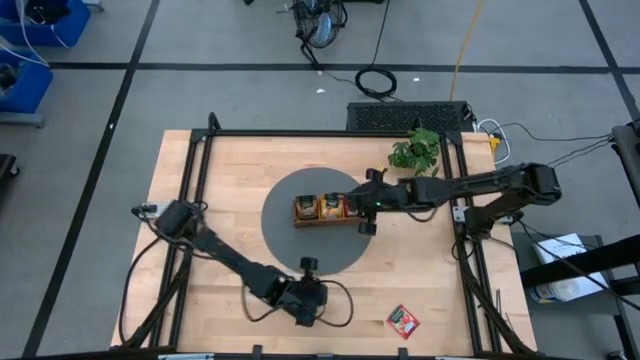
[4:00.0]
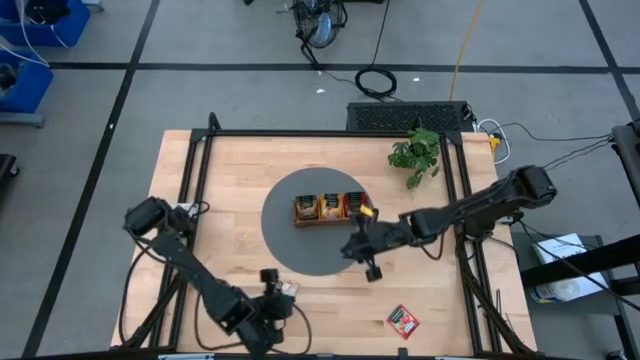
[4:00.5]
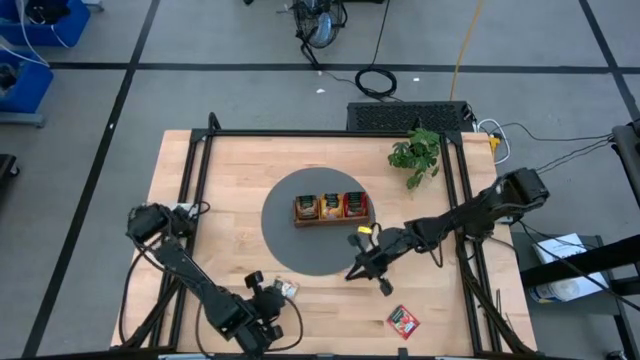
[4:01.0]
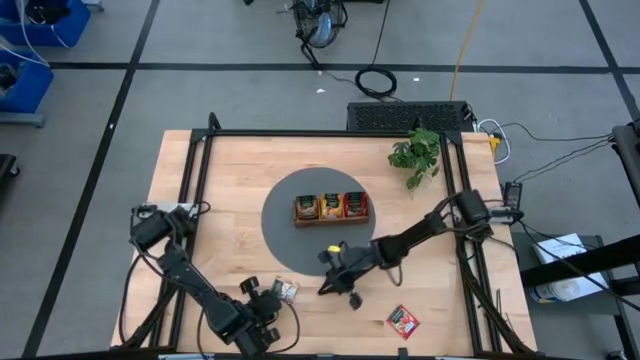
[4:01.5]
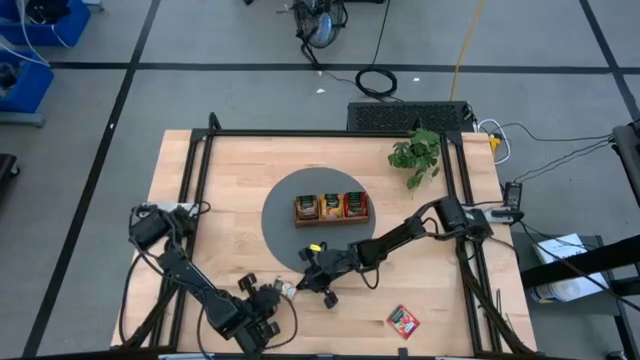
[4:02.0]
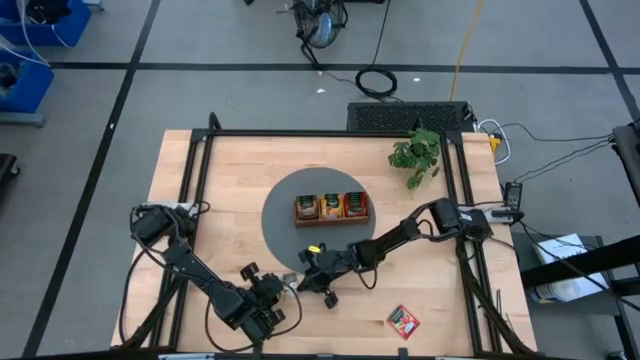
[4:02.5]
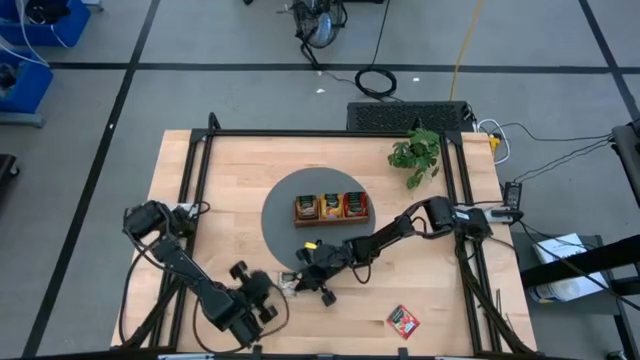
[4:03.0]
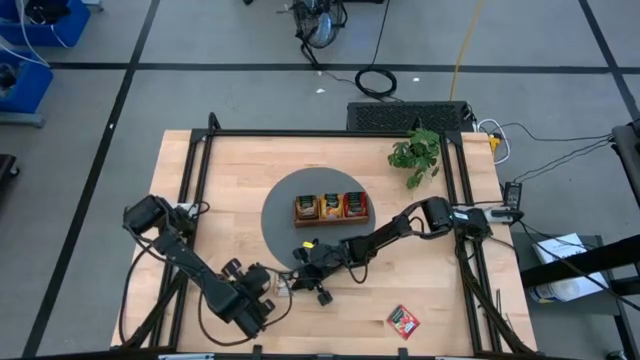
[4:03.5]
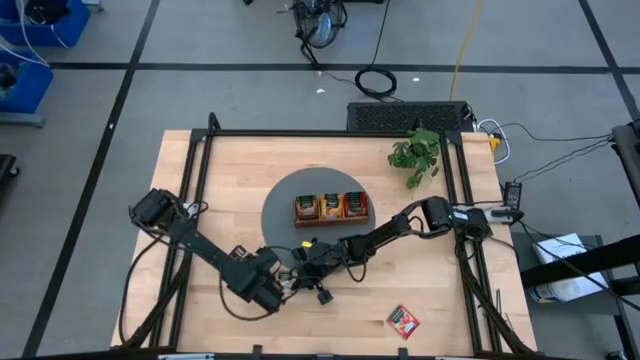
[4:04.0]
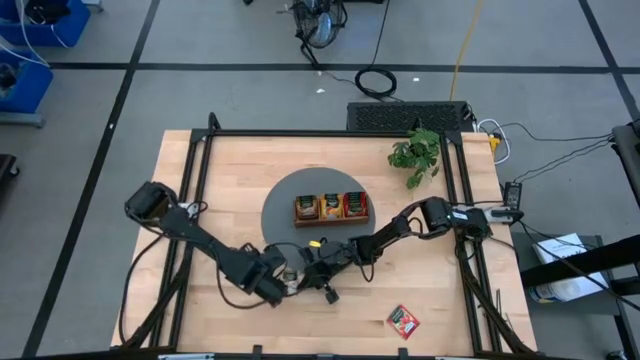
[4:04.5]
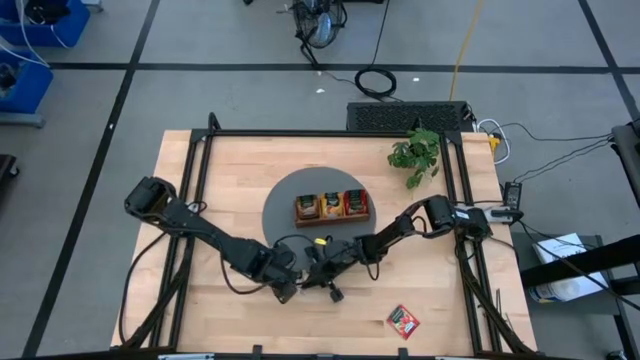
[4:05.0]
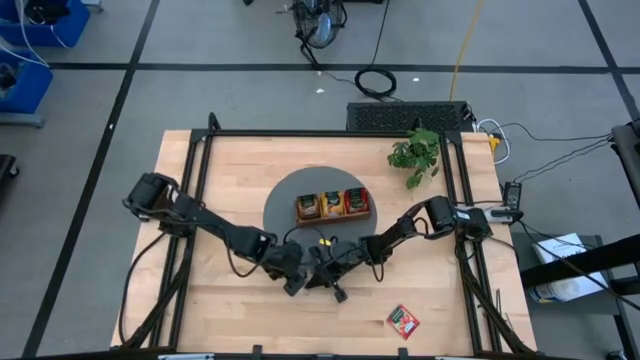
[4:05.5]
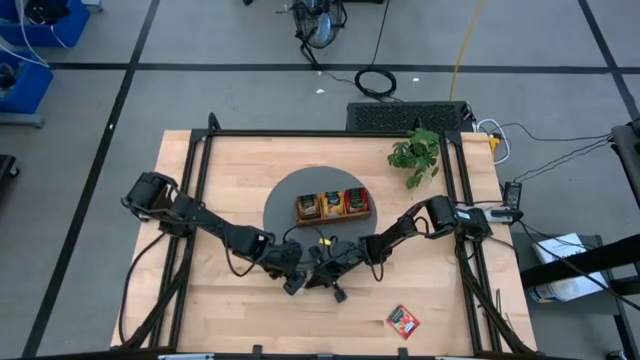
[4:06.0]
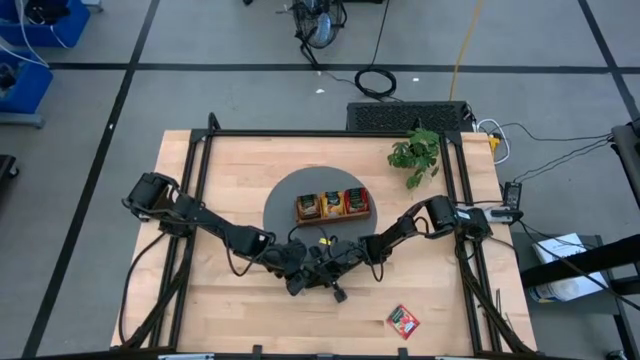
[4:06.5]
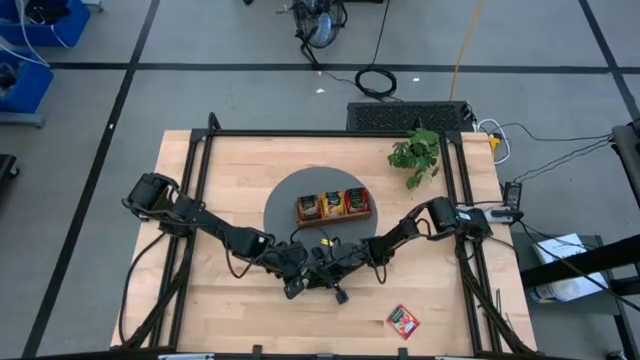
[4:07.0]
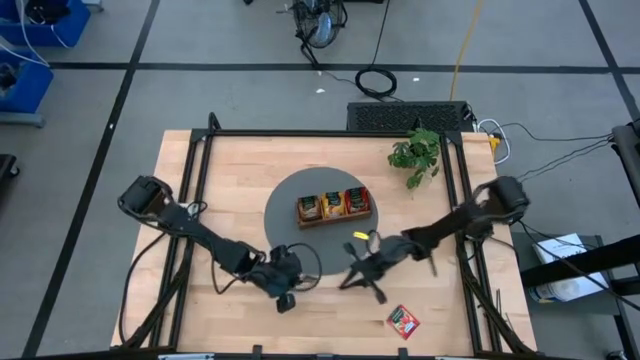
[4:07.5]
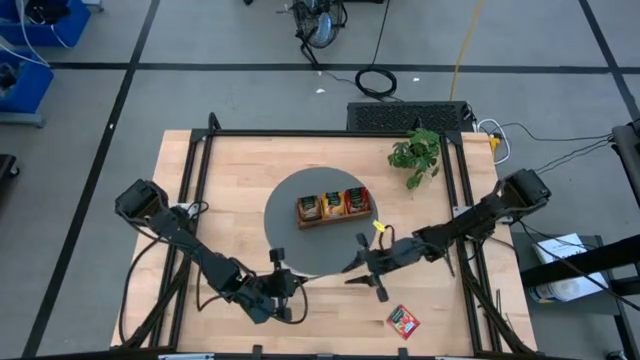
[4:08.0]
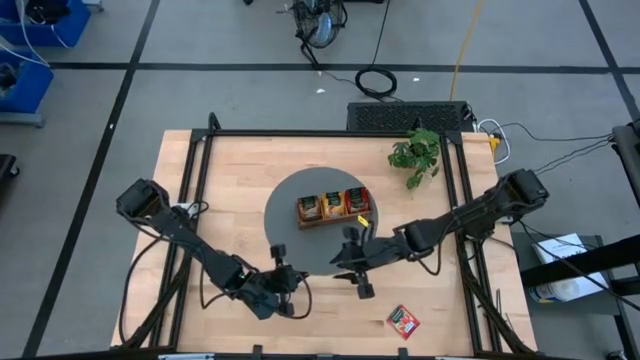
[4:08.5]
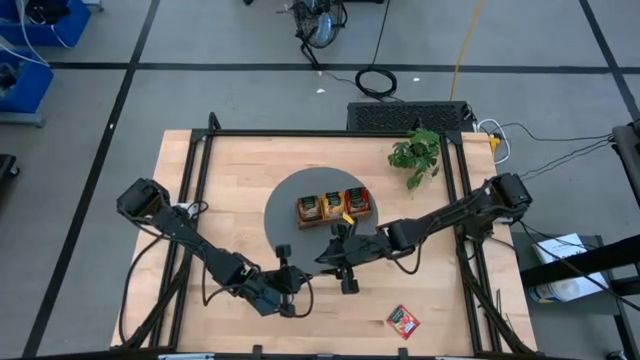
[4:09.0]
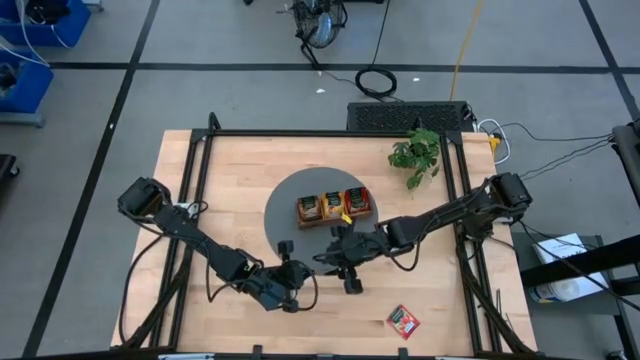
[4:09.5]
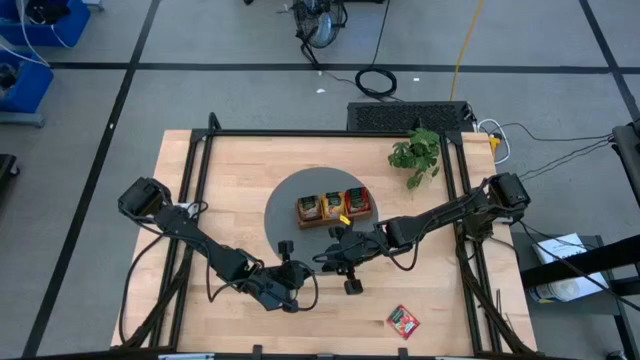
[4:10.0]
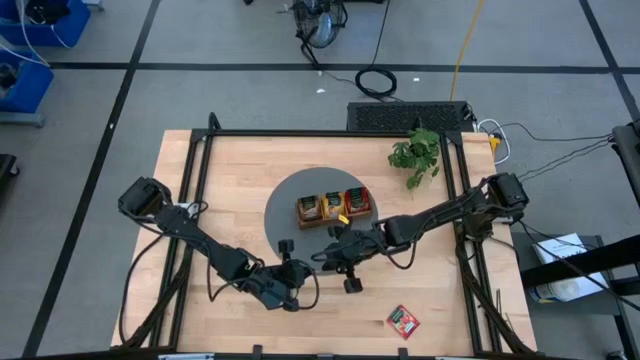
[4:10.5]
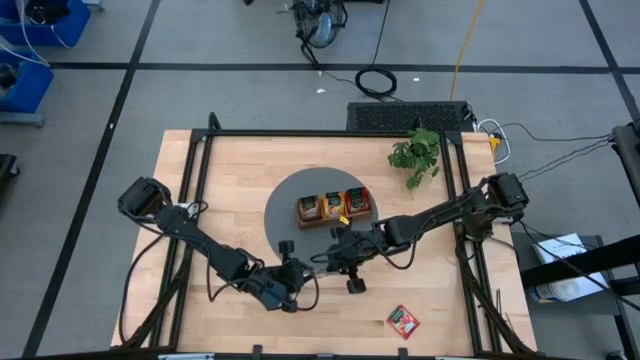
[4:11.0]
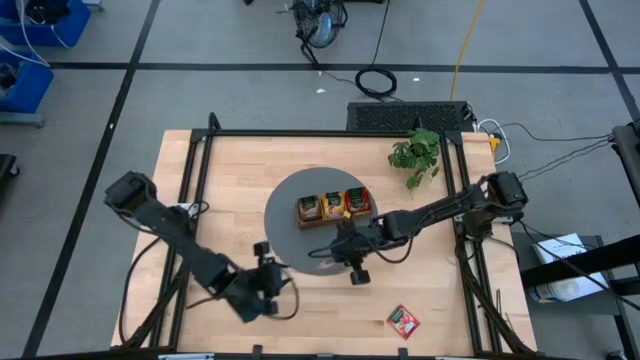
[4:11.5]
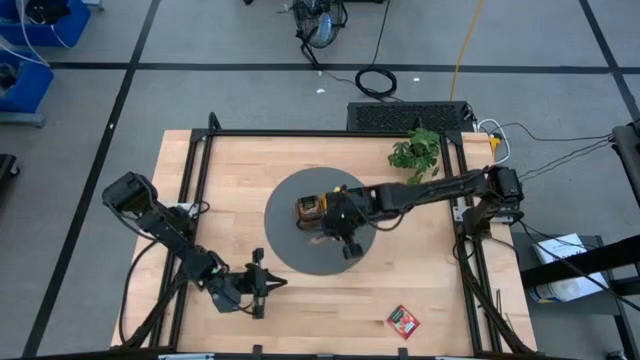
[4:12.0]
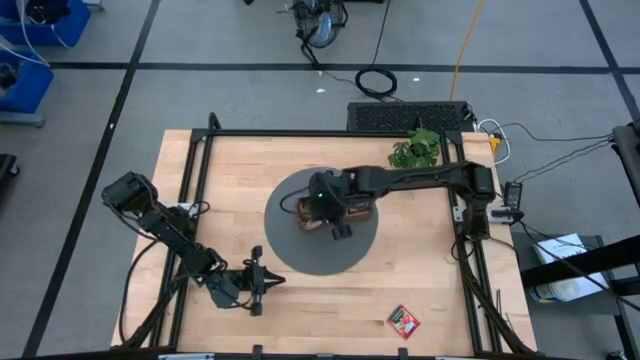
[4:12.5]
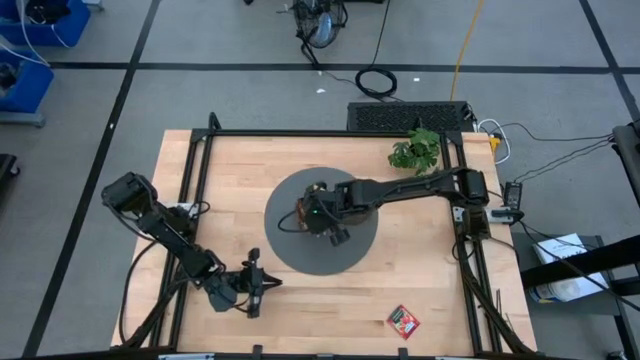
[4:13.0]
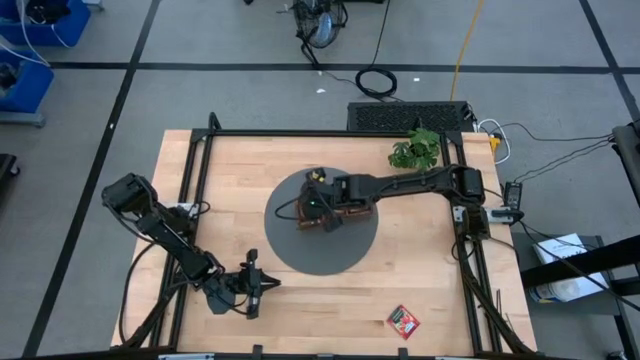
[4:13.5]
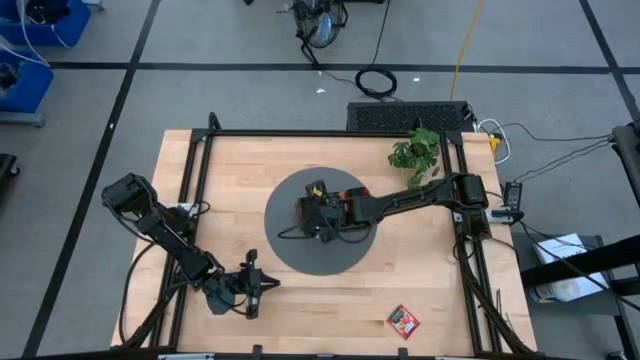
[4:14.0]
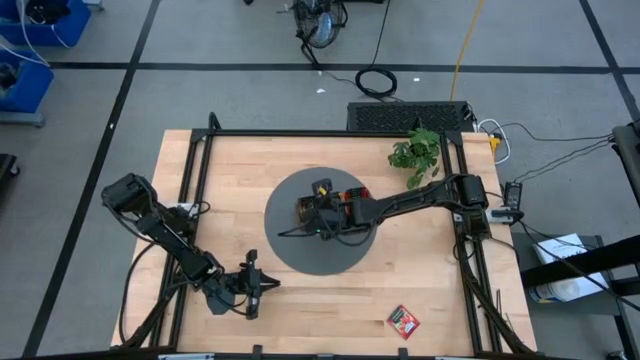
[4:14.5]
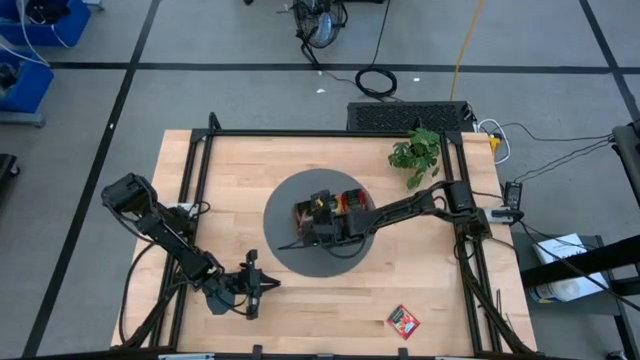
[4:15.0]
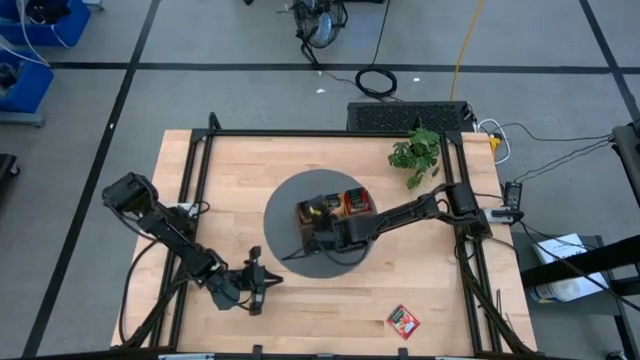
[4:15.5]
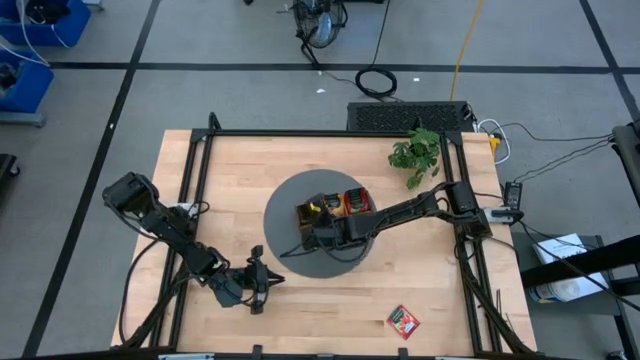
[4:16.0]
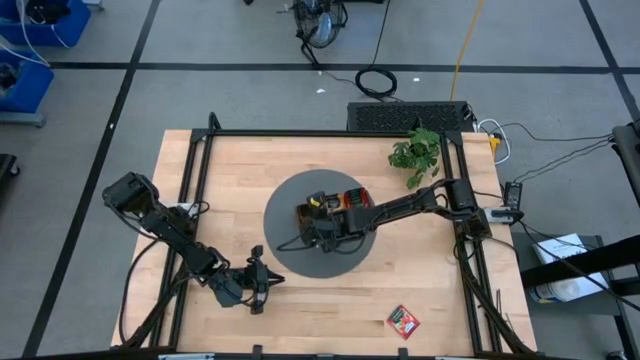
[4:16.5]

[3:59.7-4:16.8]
Task: Pick & Place Tea
Put the light brown tea sachet into the left section of the wooden organizer

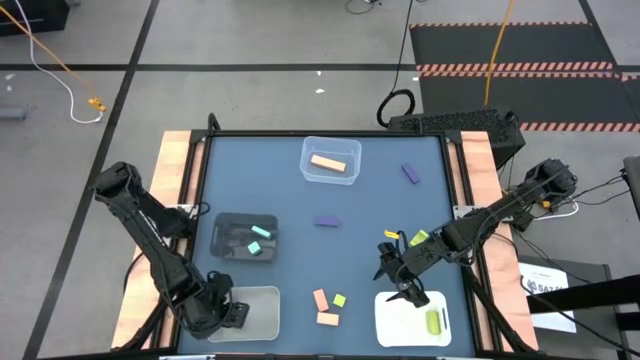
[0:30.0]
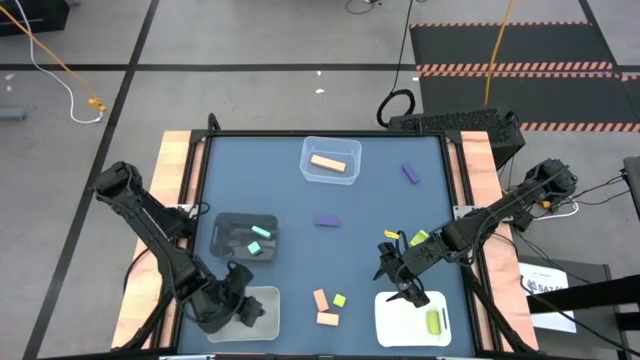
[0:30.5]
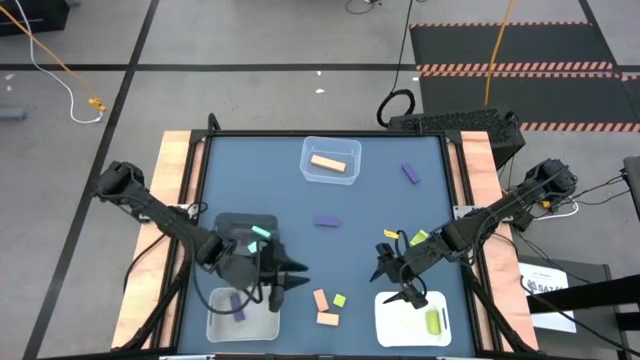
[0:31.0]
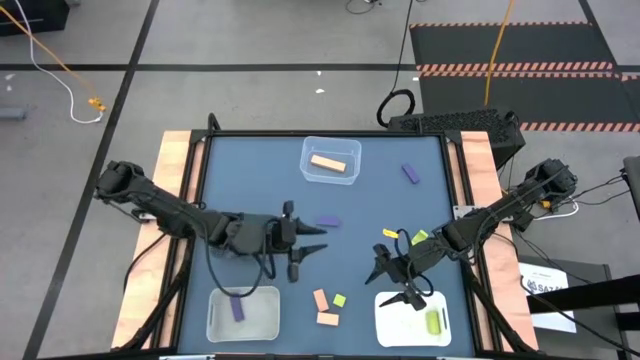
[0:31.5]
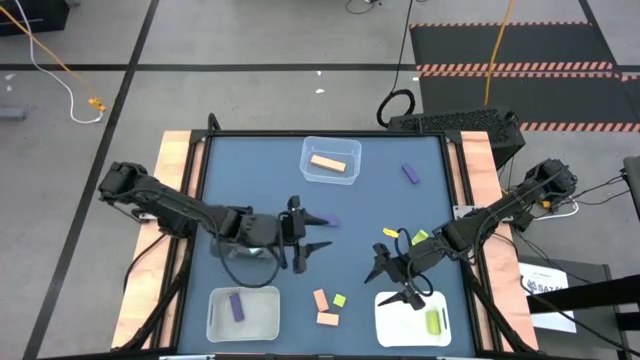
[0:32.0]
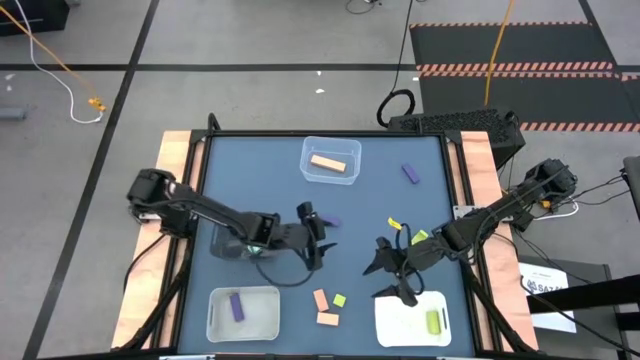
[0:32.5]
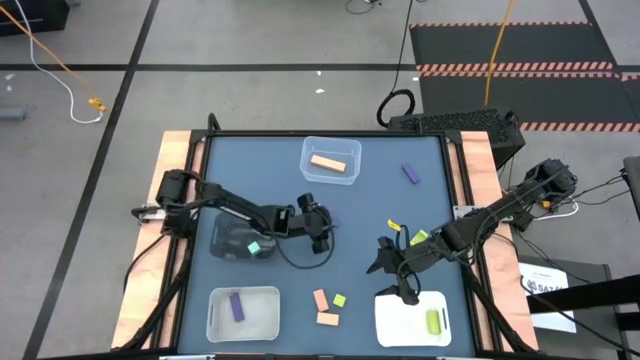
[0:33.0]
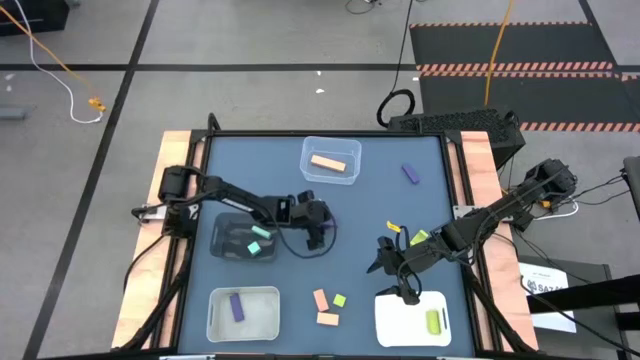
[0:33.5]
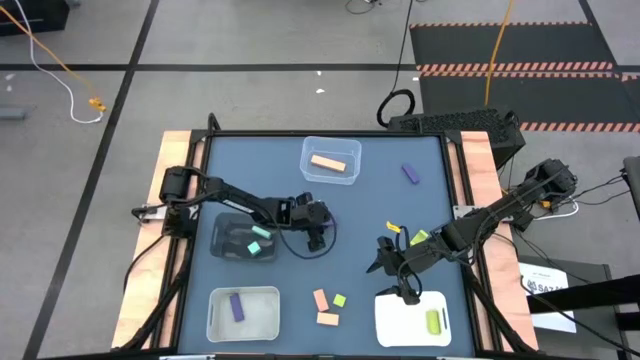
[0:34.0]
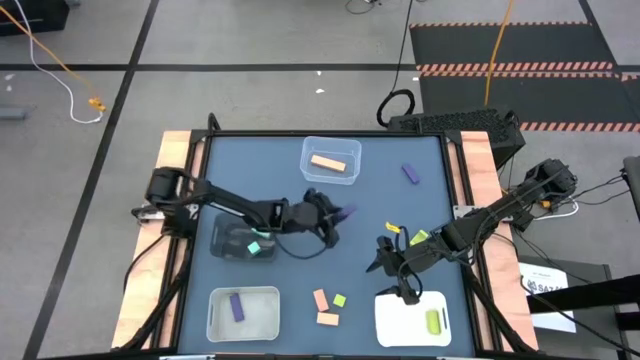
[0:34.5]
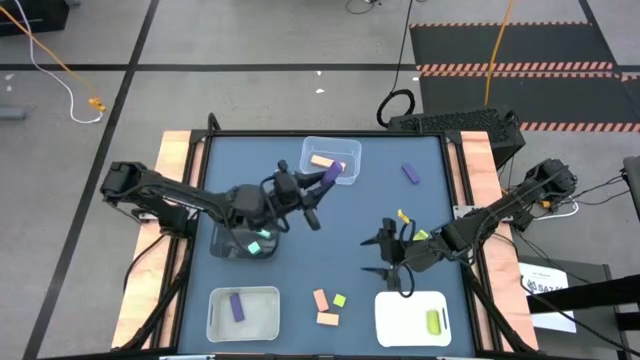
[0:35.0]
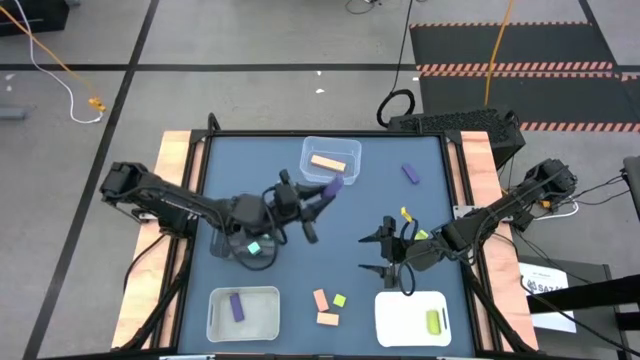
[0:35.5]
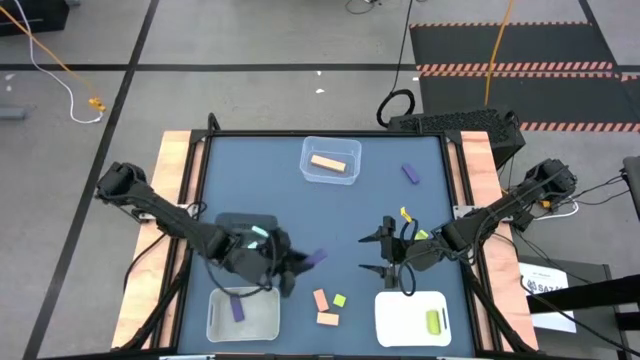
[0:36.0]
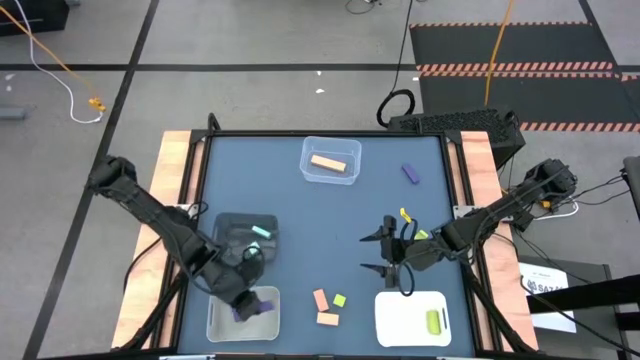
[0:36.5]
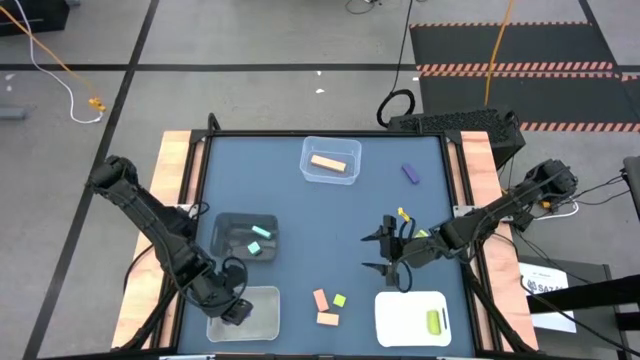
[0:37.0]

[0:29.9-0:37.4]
Task: Sort & place blocks by color
Put the bottom purple blocks into the gray bin
